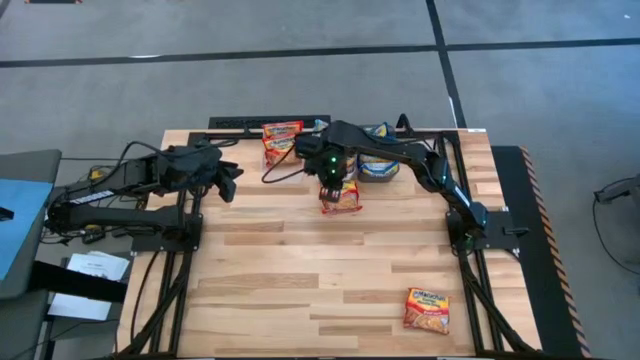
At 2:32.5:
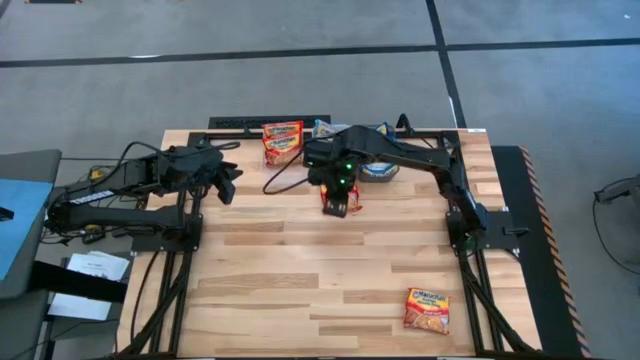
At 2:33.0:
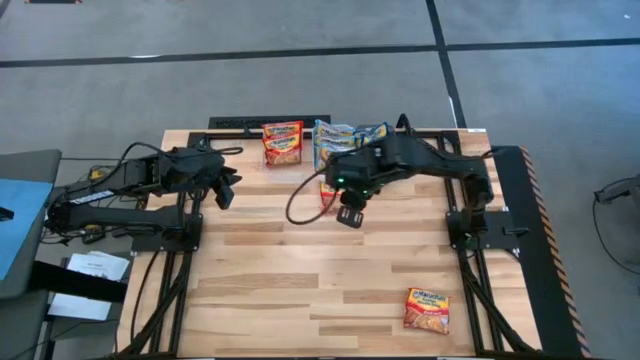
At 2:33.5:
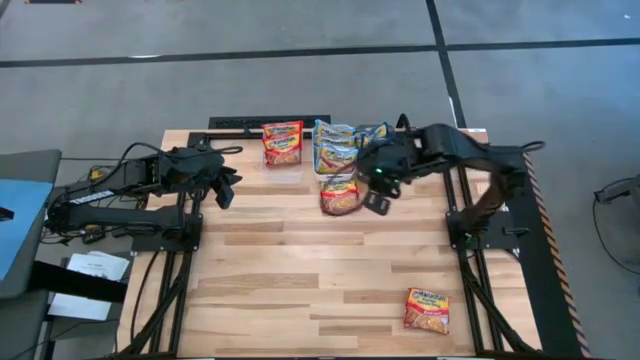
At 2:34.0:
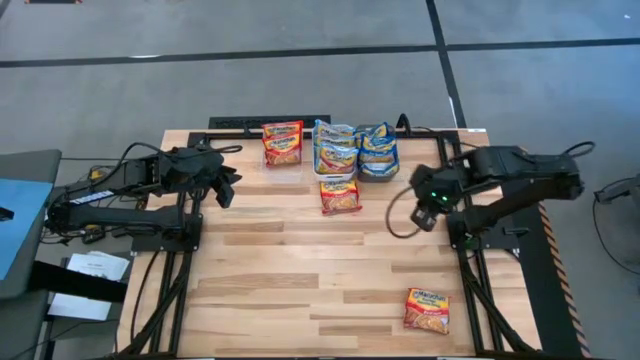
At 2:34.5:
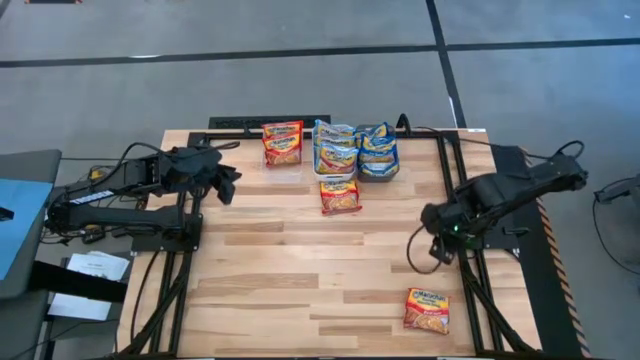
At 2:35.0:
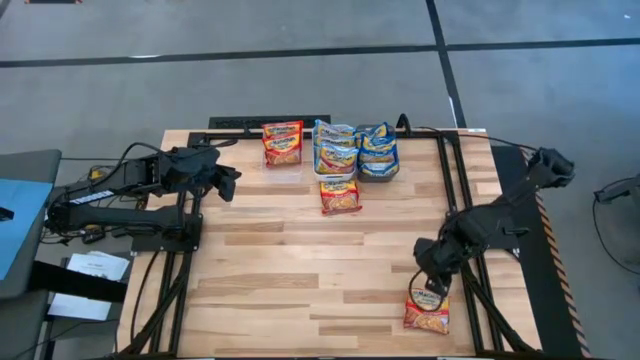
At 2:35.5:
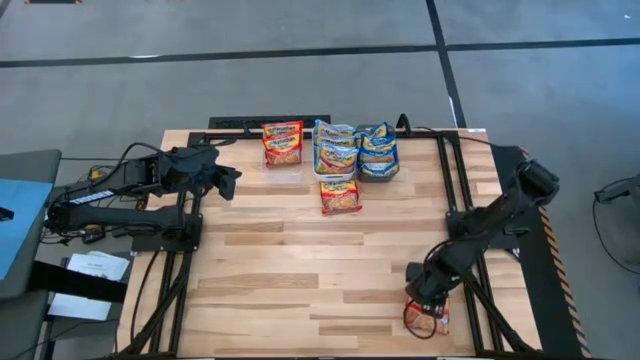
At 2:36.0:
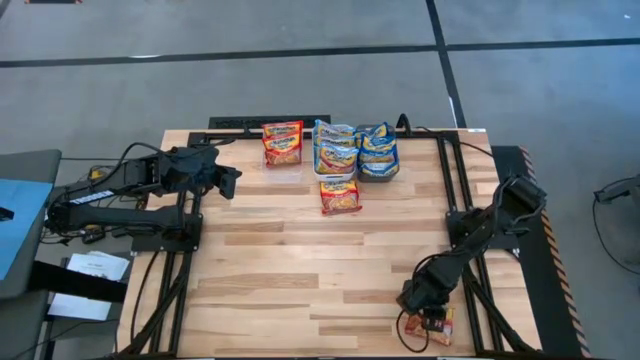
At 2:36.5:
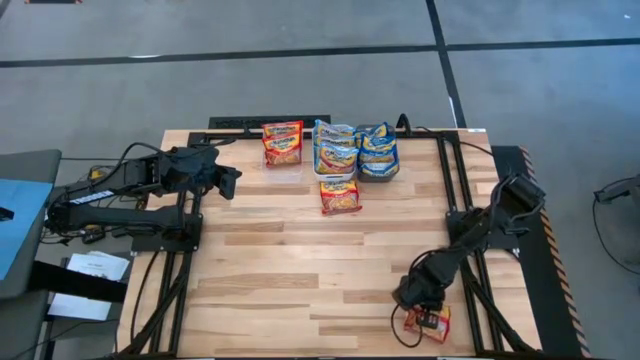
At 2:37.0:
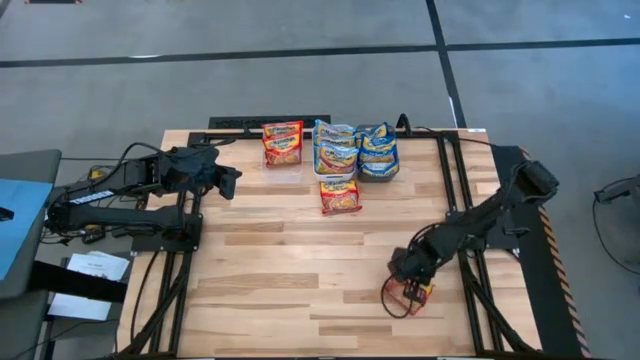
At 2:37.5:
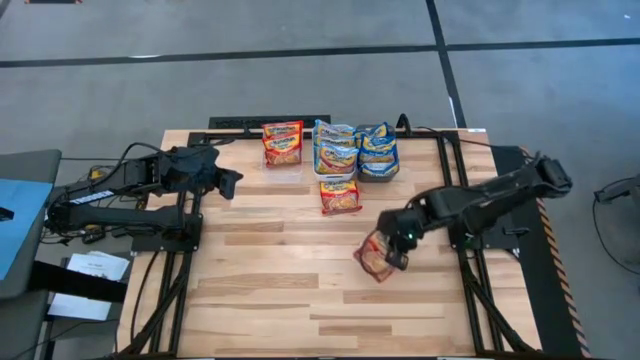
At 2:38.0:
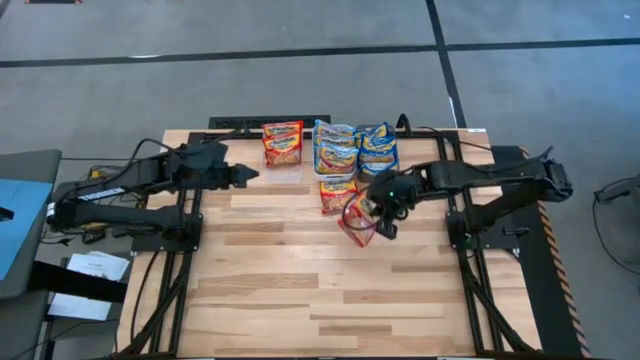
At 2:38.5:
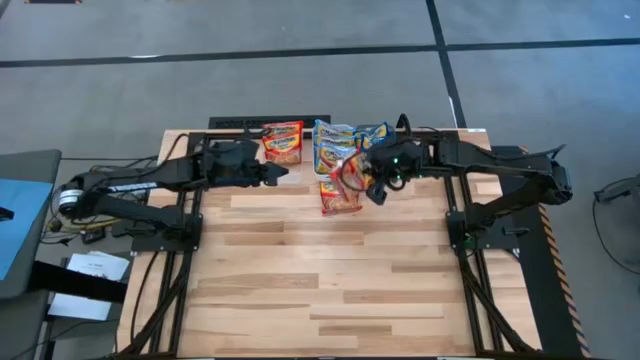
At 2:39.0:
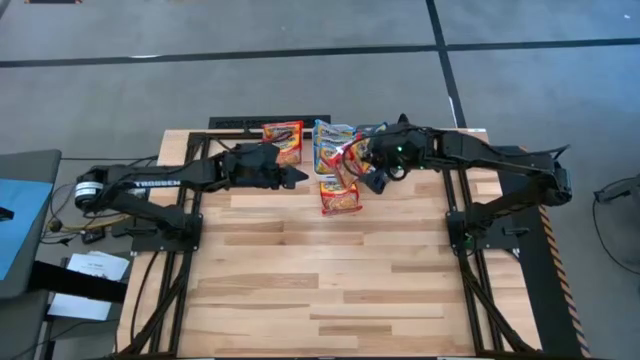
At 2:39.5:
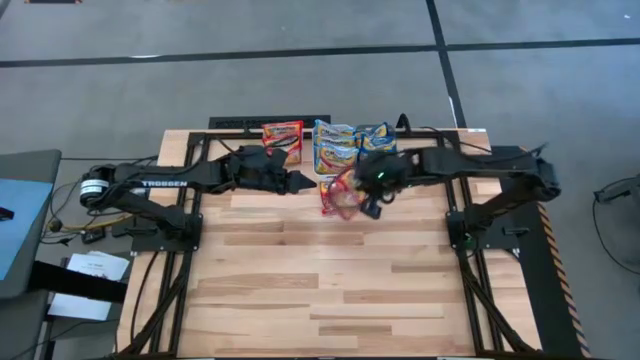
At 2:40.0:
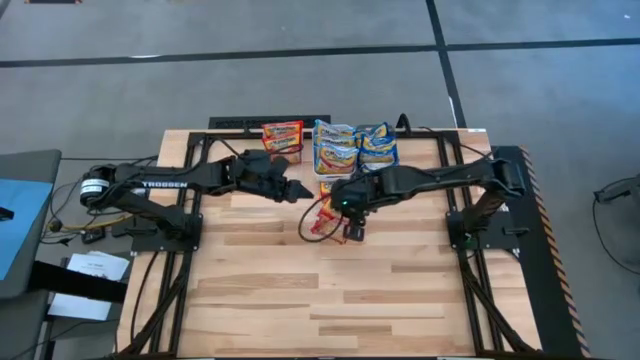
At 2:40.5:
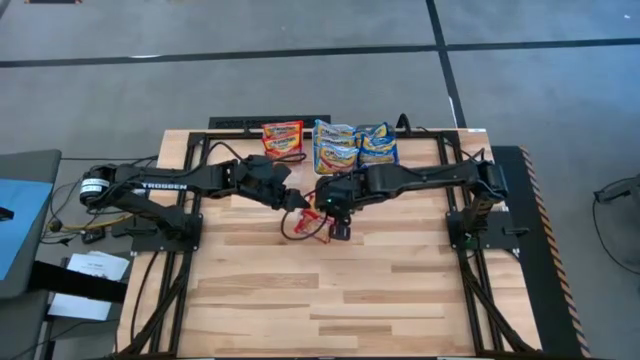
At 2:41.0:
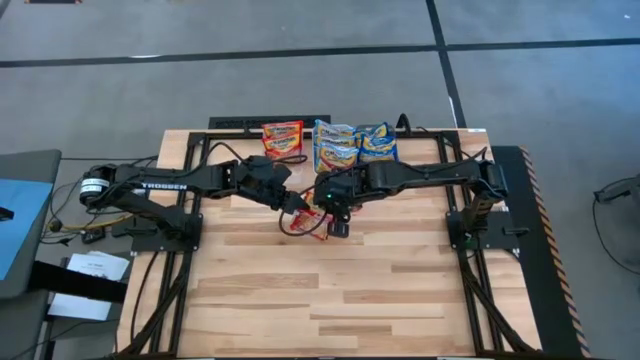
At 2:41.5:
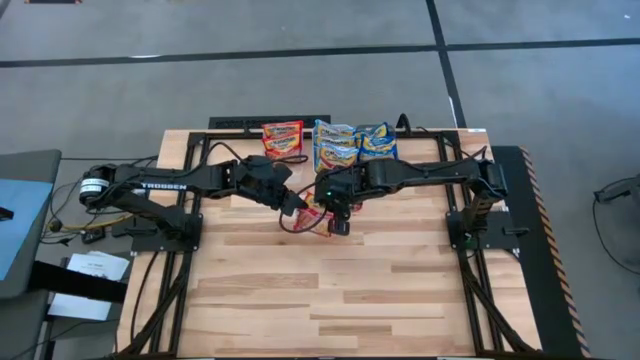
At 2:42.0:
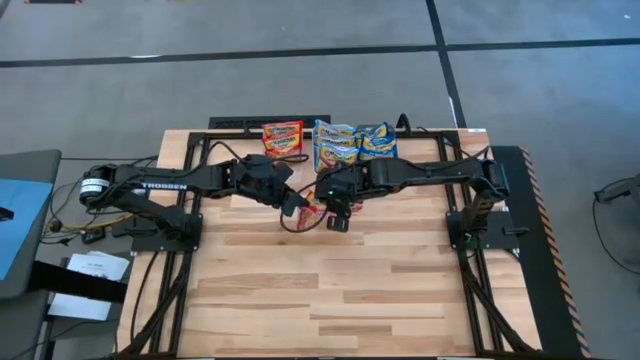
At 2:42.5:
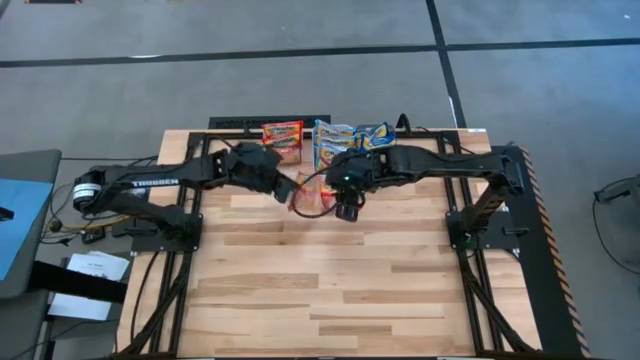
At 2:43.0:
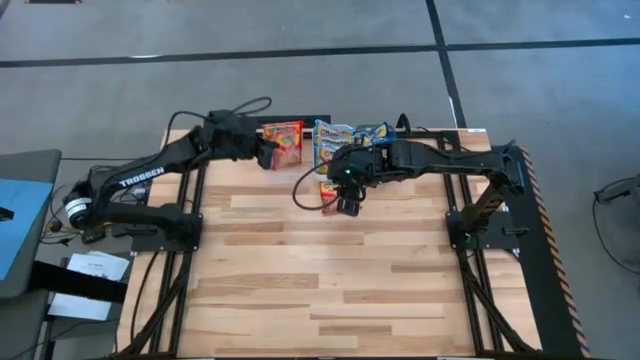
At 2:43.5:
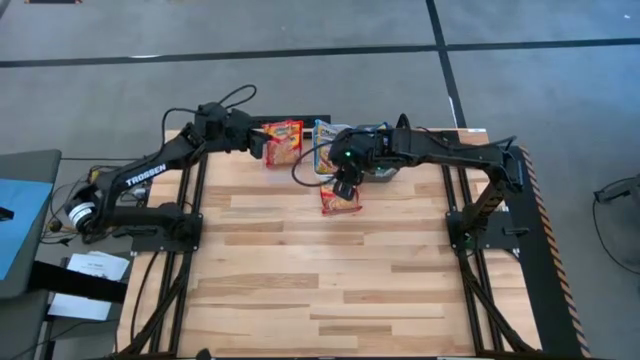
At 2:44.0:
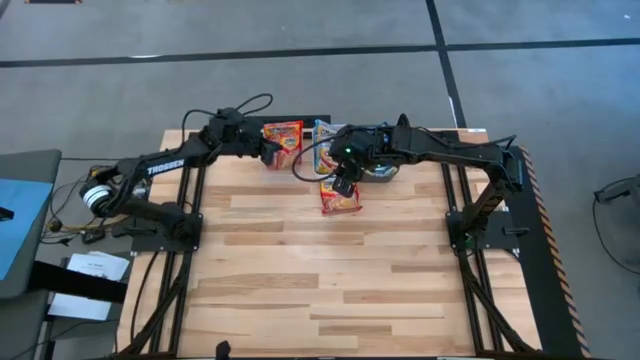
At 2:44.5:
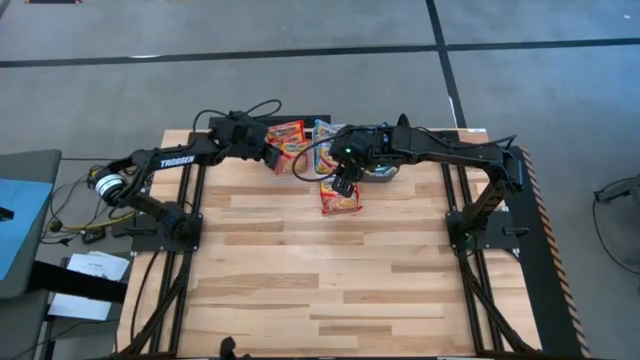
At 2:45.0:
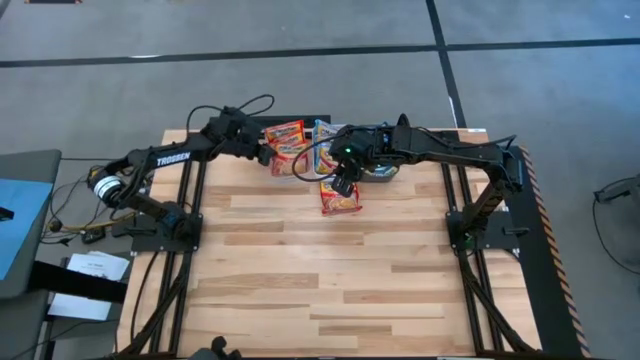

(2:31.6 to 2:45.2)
Task: Sort Maruchan noodles
Put the red noodle pack into the transparent bin

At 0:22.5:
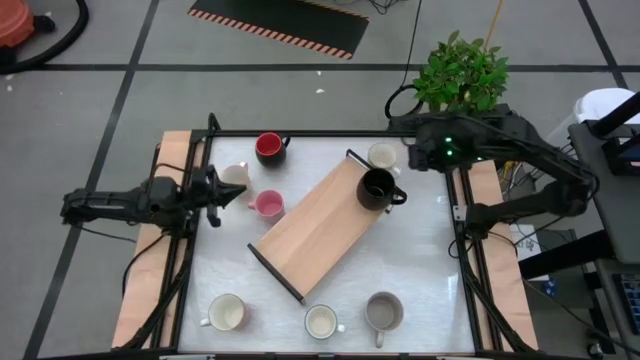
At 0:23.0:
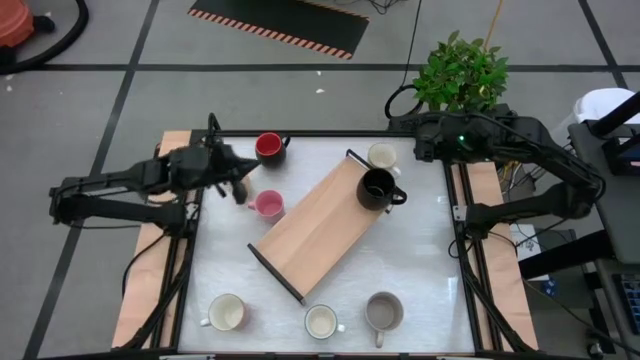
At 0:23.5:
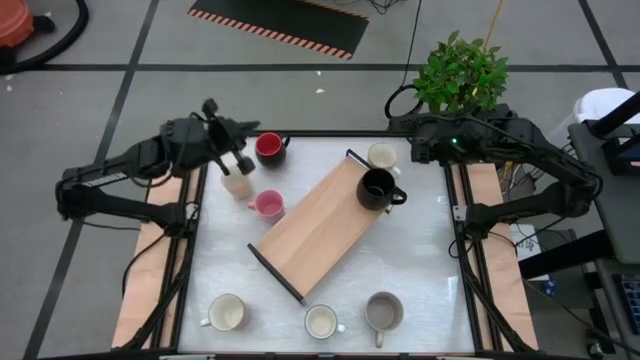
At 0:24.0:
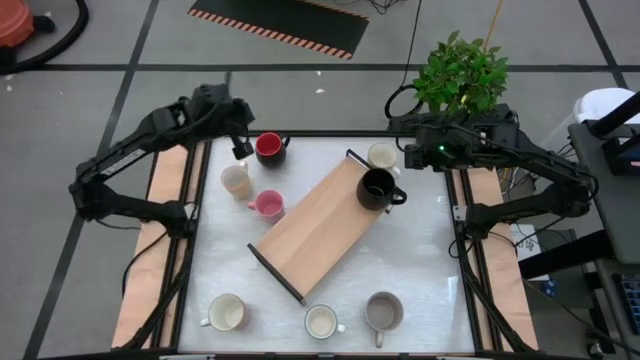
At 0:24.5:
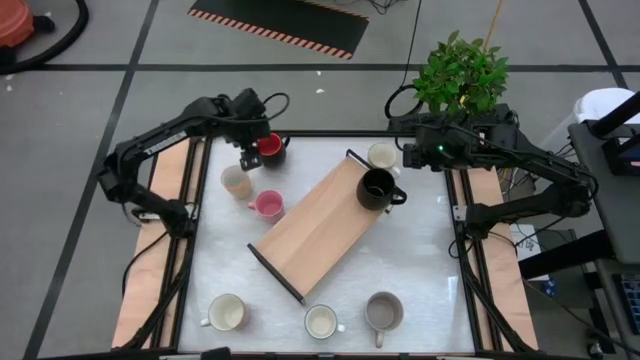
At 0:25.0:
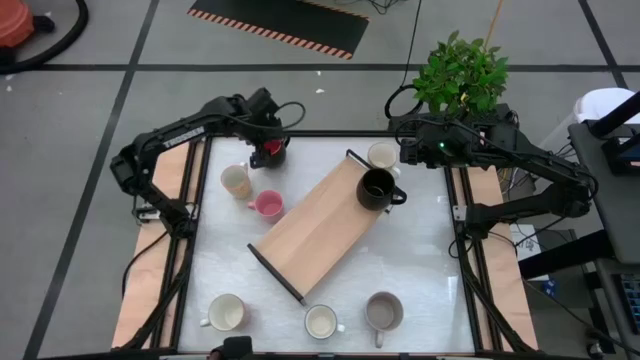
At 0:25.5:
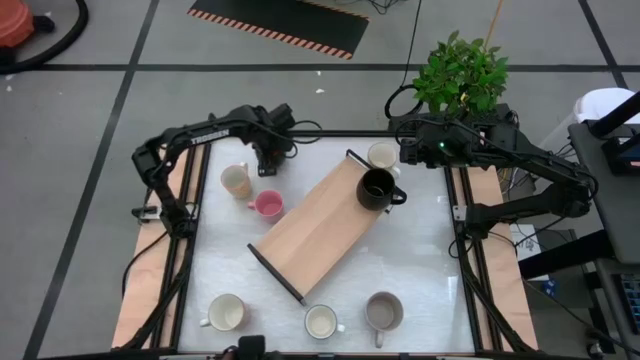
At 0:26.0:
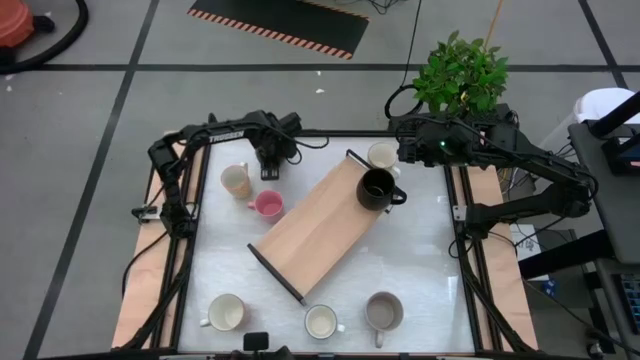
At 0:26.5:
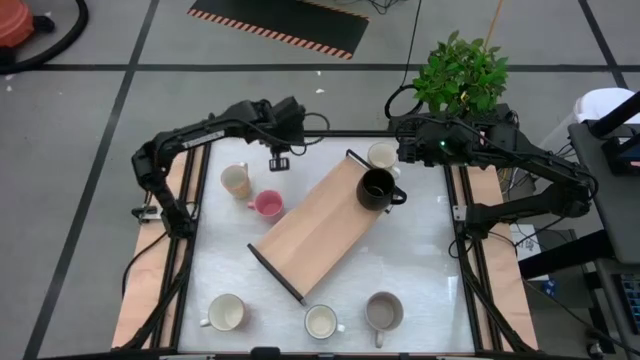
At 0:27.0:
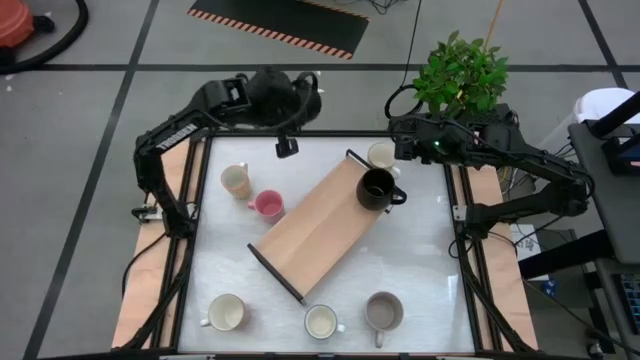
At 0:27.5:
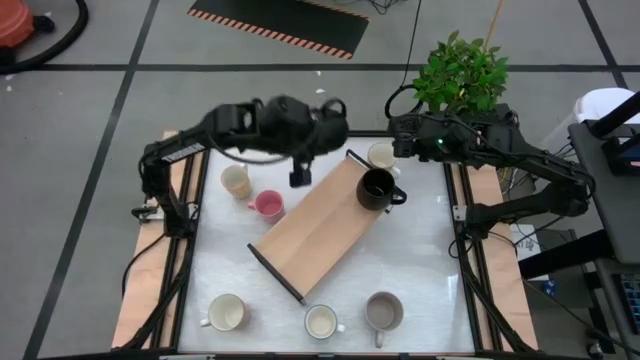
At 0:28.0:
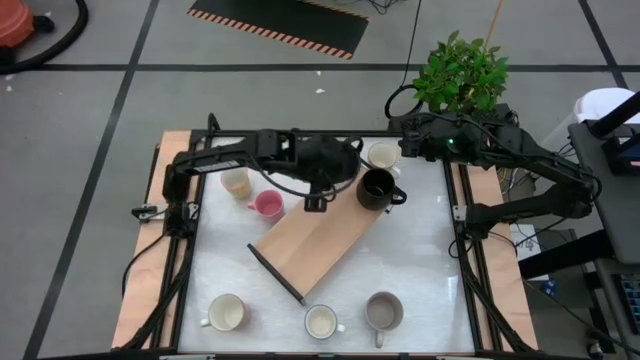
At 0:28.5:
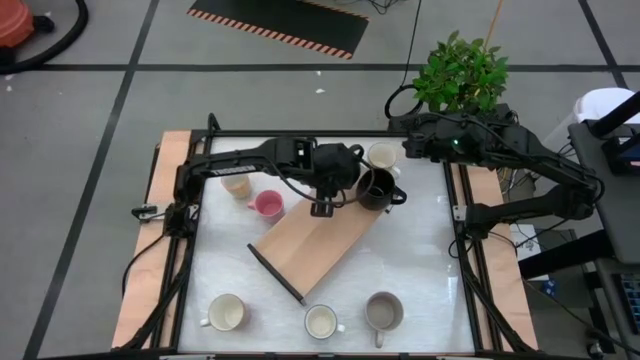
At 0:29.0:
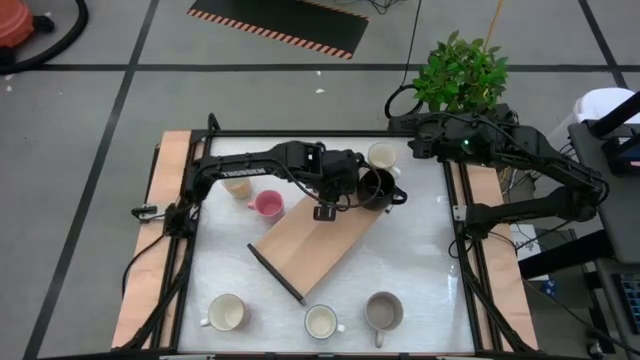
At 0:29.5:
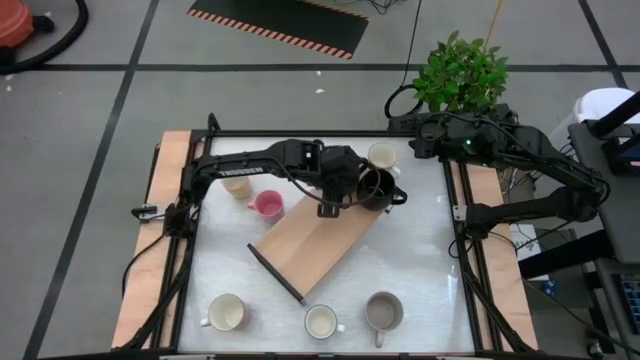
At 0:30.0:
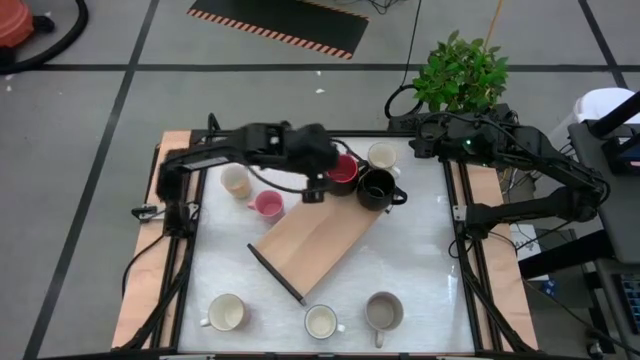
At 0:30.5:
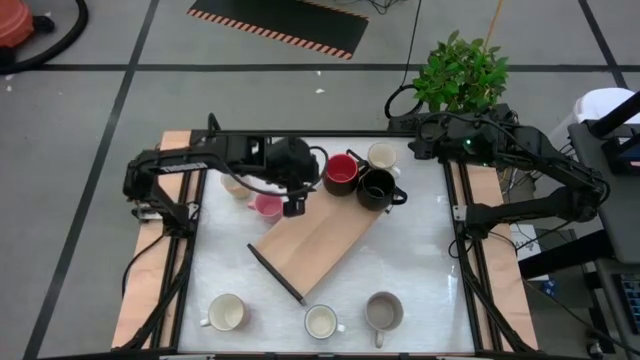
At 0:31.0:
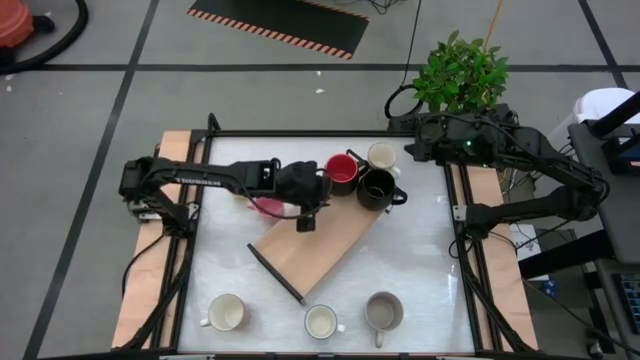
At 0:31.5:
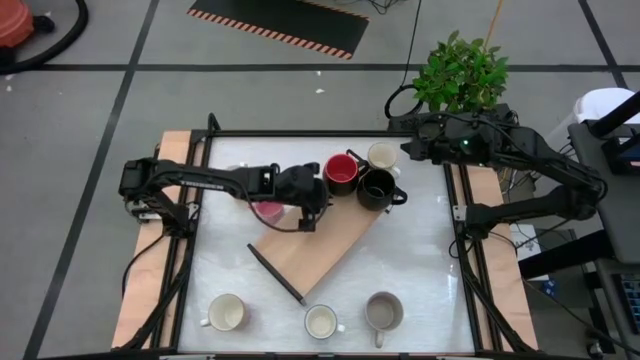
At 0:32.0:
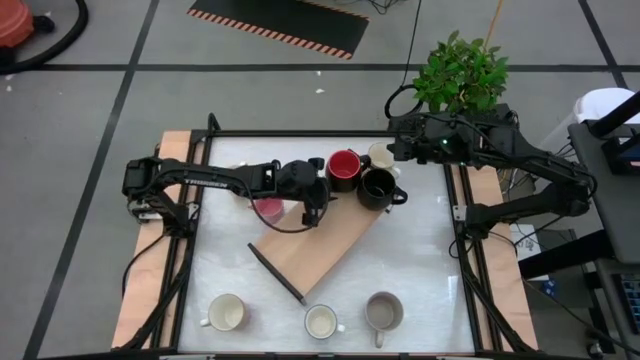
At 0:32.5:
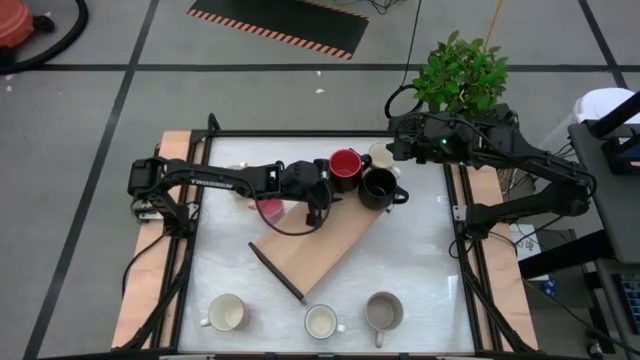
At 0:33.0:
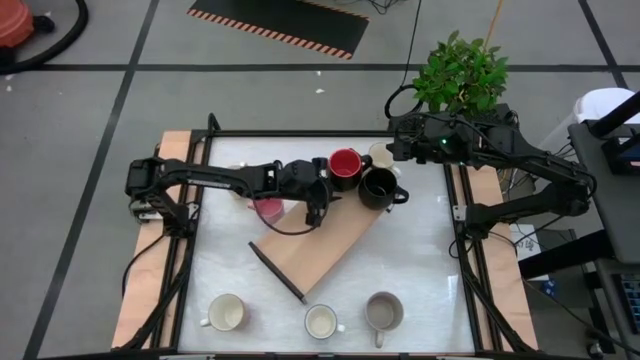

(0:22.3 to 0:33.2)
Task: Place coffee mugs
Put the black mug on top of the shelf
